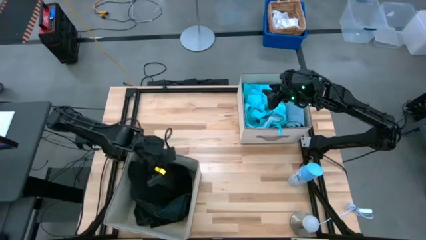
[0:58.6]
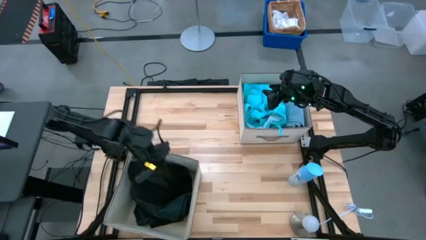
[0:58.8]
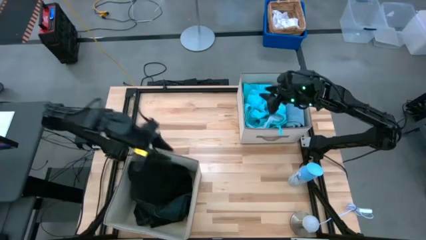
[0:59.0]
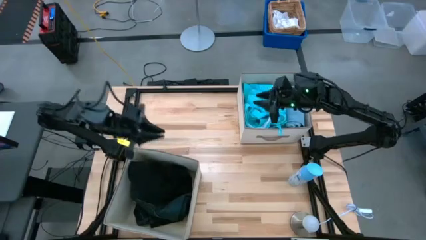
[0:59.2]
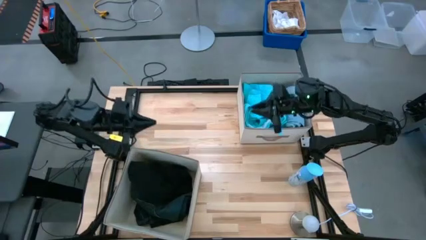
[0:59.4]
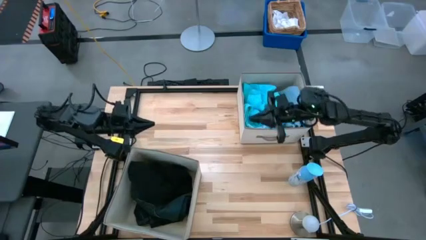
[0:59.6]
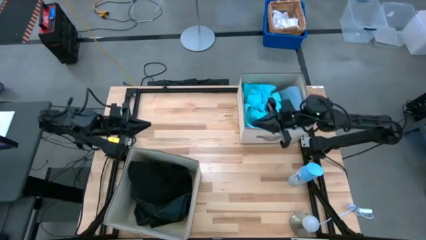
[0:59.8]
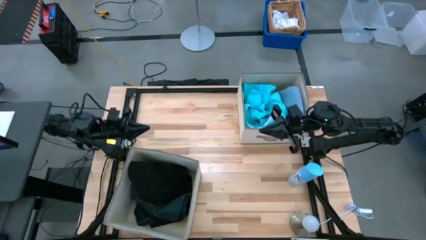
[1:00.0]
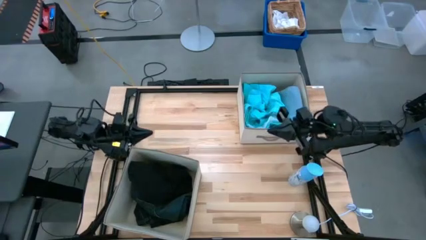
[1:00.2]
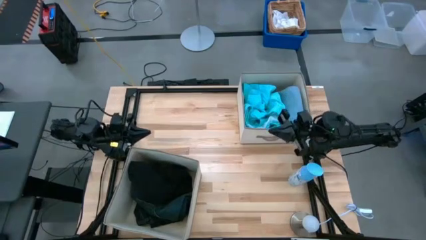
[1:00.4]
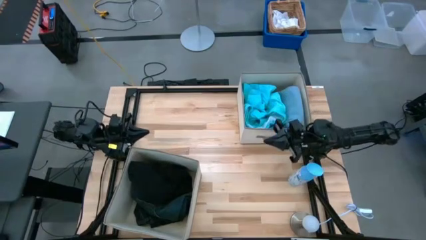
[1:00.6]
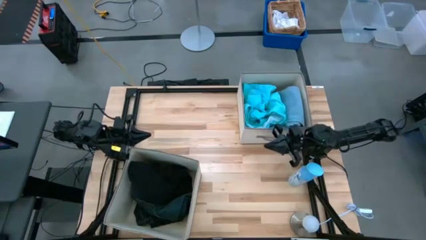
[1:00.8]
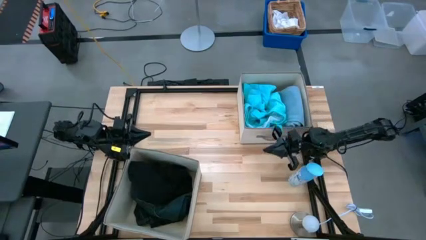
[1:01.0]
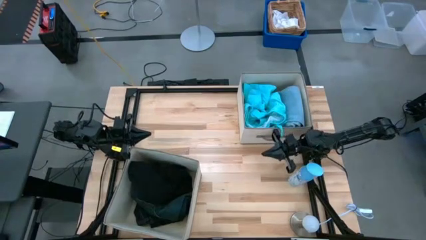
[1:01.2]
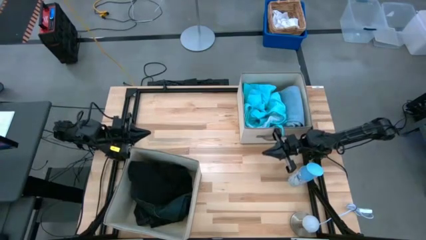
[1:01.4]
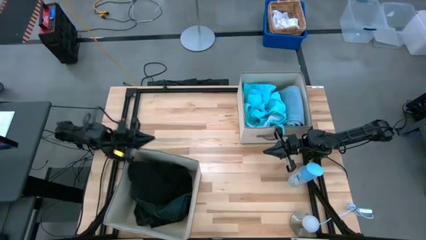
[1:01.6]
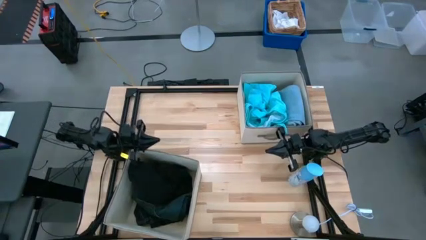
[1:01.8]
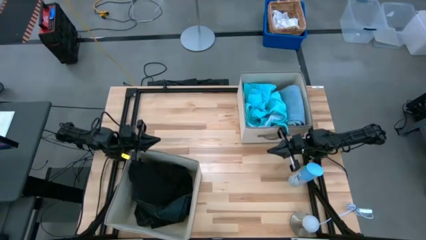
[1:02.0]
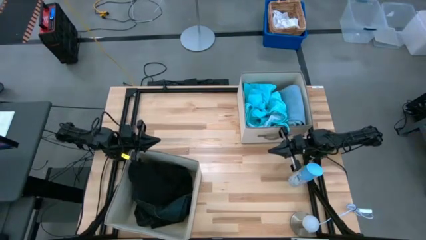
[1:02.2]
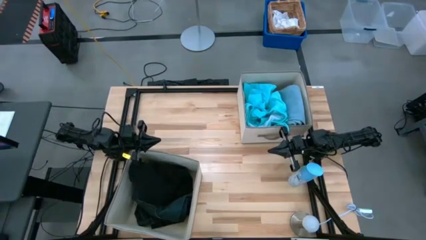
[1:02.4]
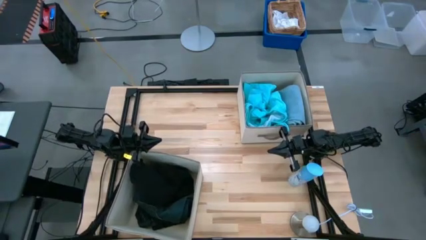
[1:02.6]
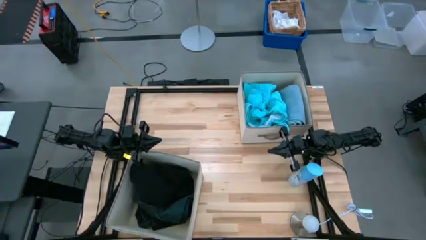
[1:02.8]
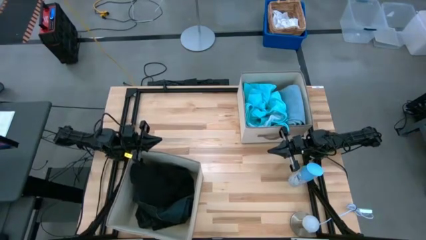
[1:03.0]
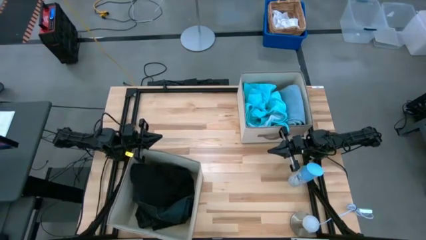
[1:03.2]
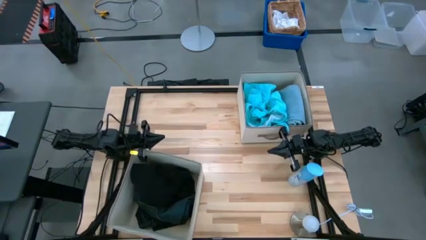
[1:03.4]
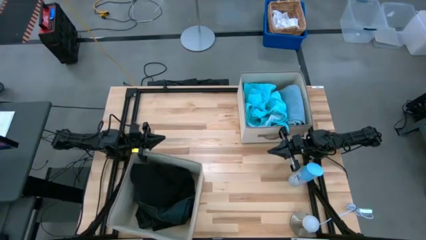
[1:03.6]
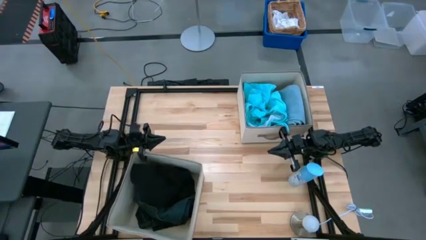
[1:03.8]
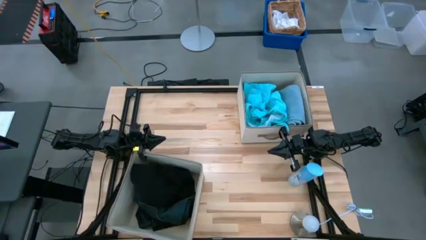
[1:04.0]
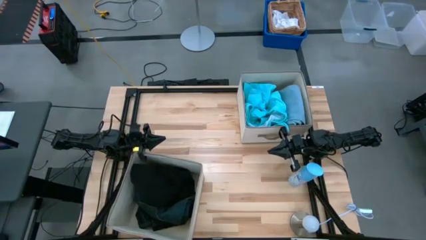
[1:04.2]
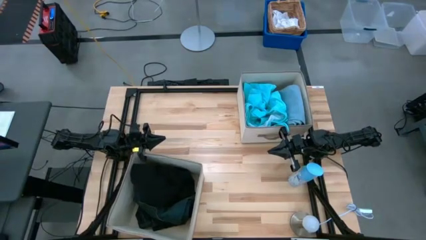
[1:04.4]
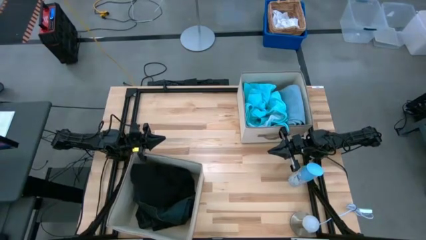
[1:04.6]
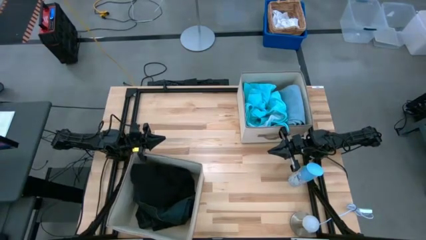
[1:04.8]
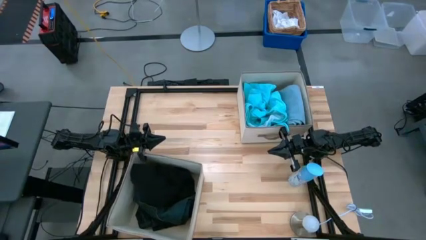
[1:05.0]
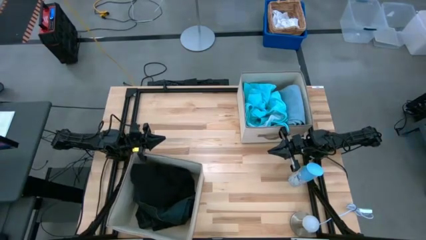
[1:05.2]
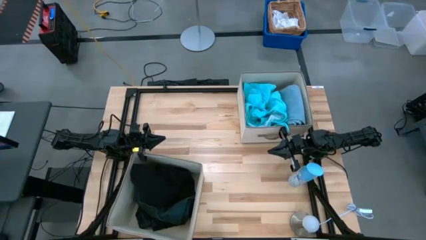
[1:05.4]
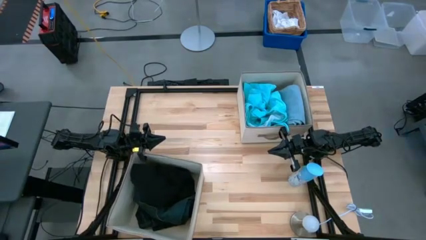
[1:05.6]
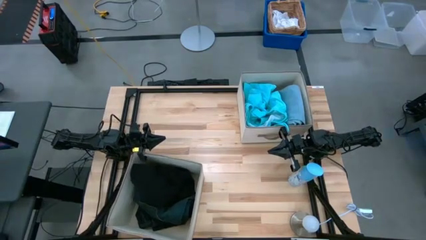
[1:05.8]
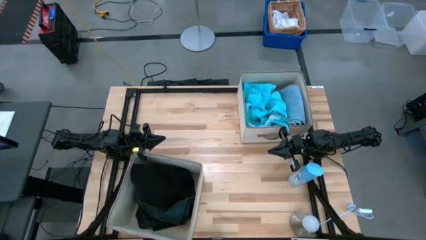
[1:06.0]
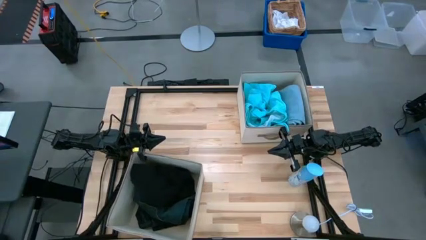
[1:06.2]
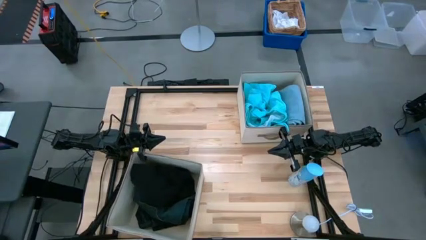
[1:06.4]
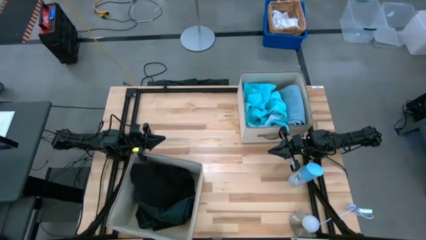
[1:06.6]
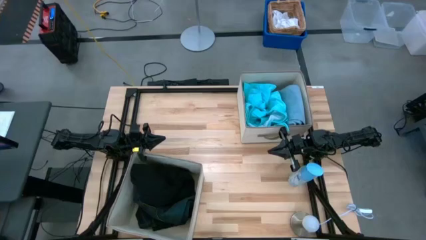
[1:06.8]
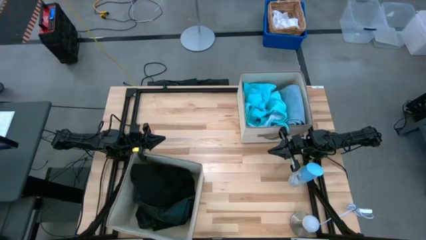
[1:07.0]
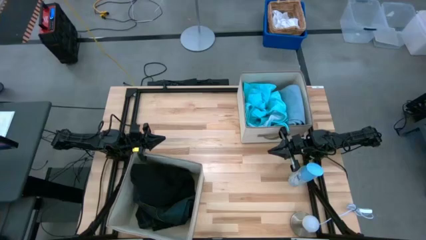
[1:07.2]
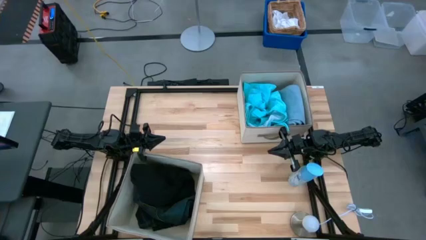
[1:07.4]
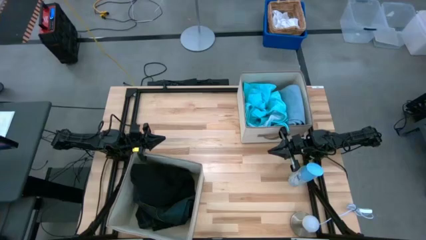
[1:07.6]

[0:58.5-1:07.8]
Task: Sort clothes
Return to Home Position

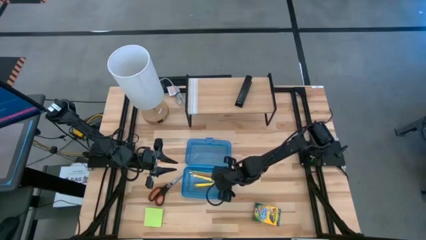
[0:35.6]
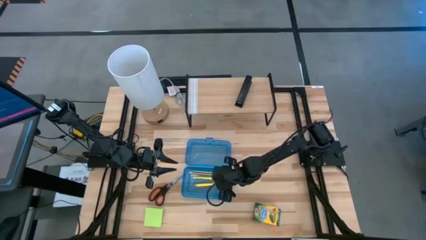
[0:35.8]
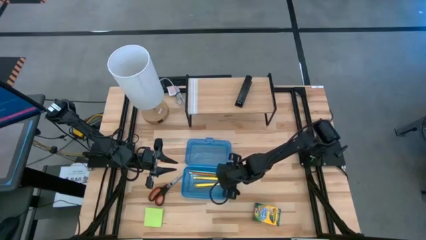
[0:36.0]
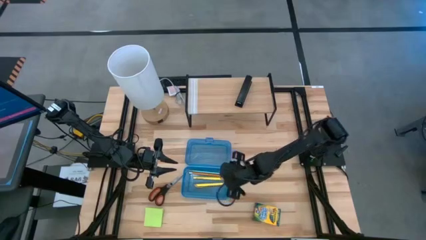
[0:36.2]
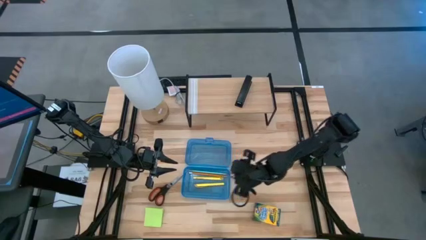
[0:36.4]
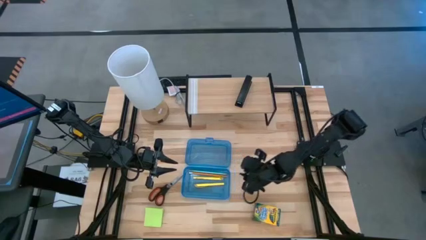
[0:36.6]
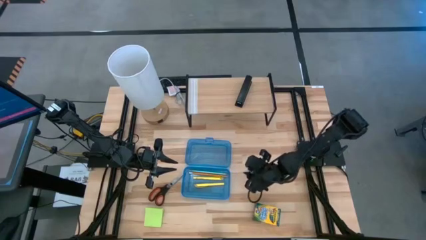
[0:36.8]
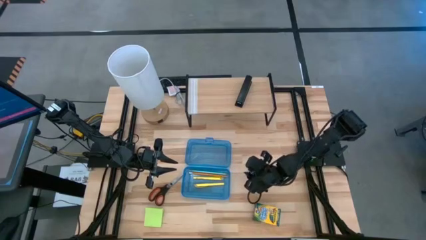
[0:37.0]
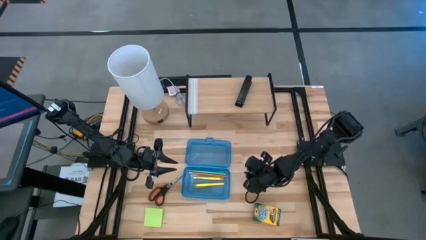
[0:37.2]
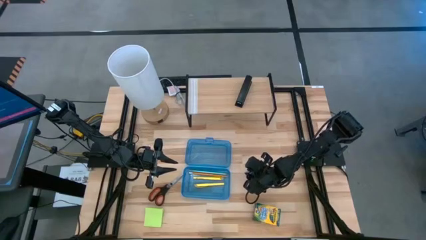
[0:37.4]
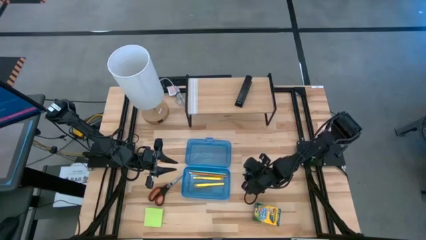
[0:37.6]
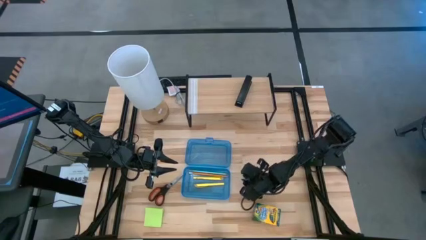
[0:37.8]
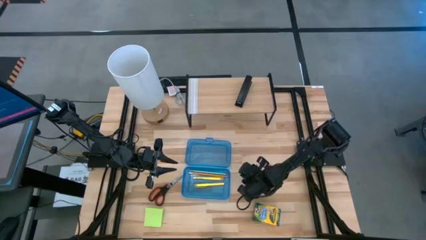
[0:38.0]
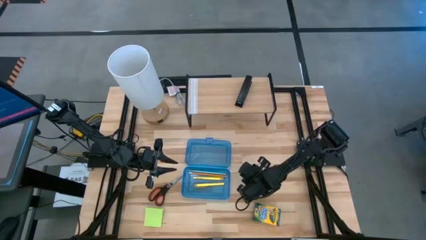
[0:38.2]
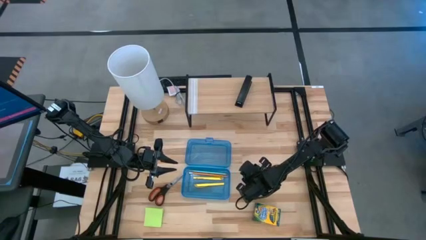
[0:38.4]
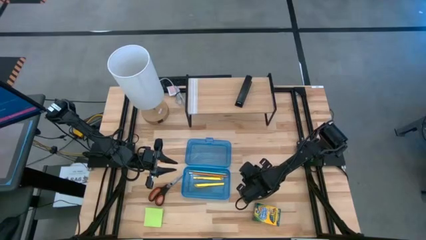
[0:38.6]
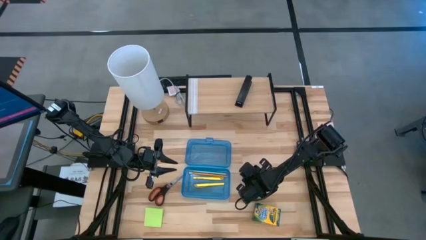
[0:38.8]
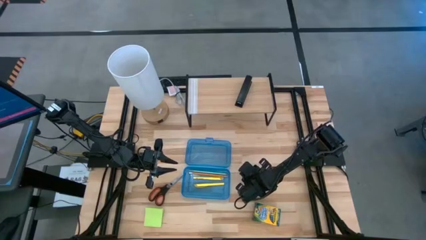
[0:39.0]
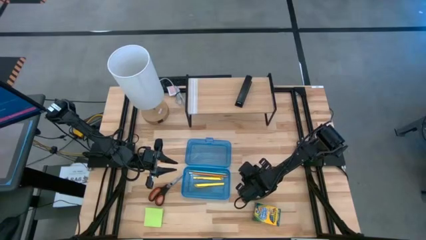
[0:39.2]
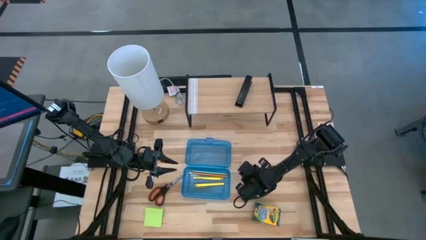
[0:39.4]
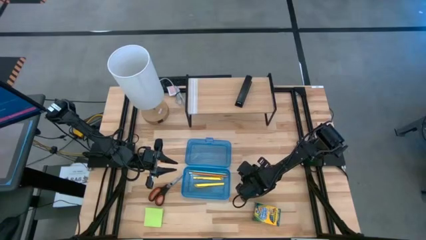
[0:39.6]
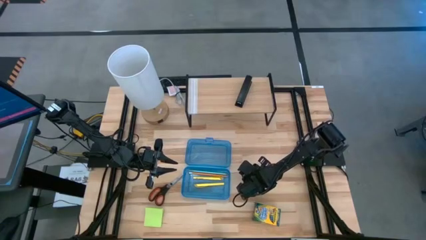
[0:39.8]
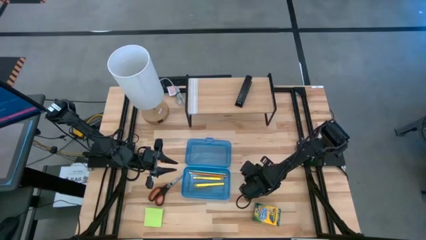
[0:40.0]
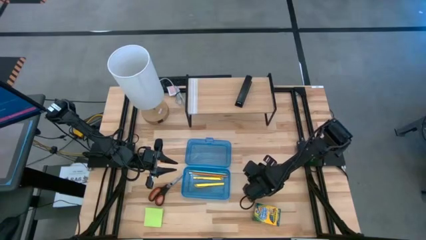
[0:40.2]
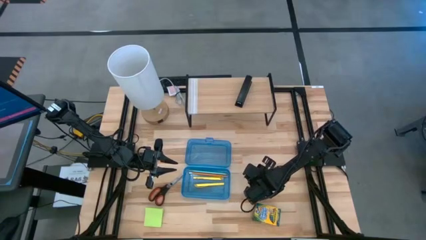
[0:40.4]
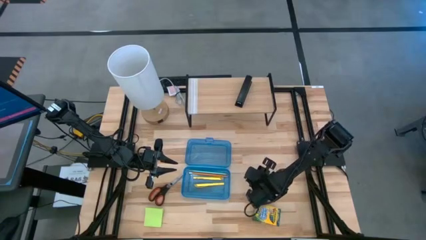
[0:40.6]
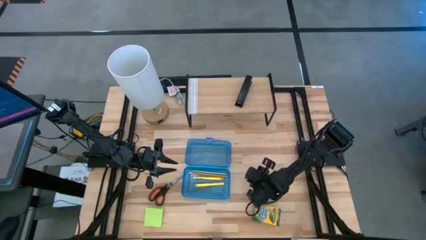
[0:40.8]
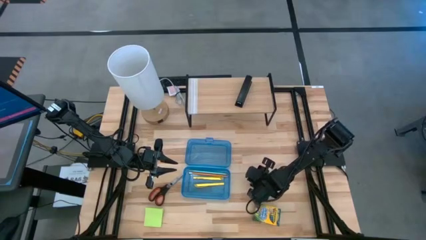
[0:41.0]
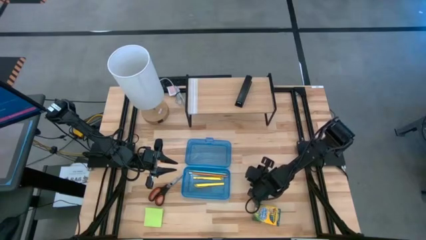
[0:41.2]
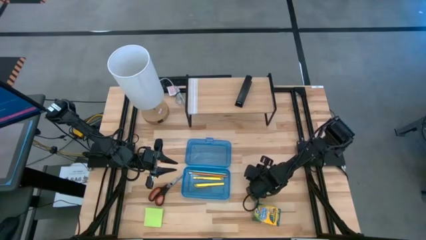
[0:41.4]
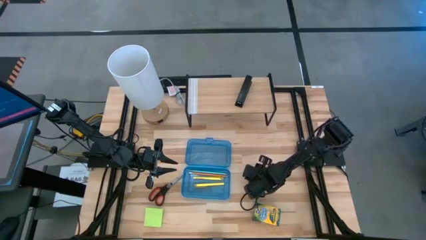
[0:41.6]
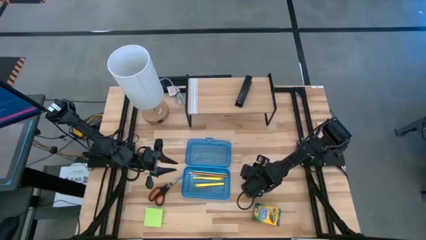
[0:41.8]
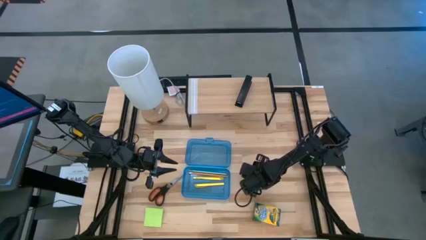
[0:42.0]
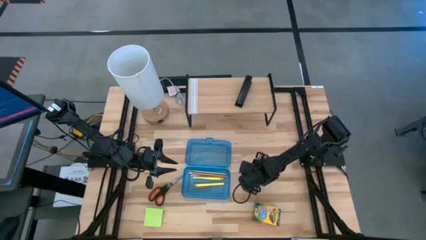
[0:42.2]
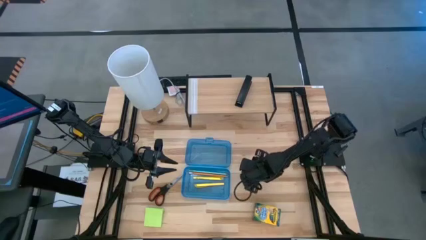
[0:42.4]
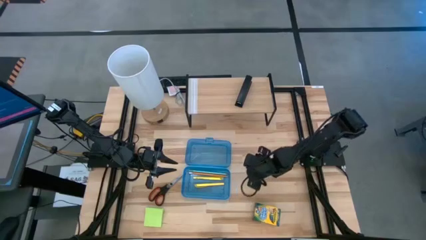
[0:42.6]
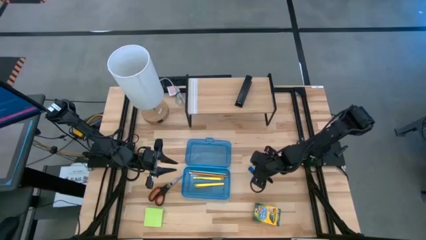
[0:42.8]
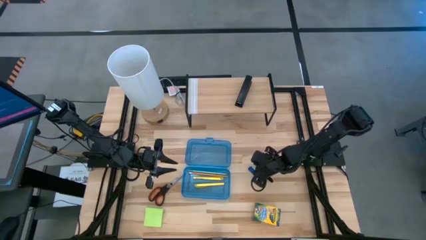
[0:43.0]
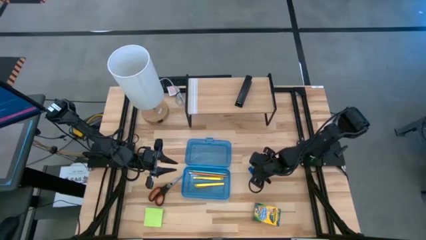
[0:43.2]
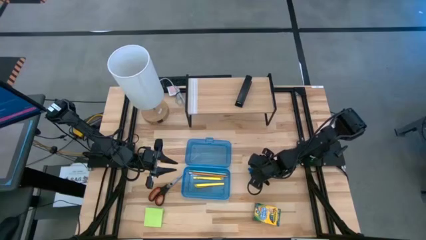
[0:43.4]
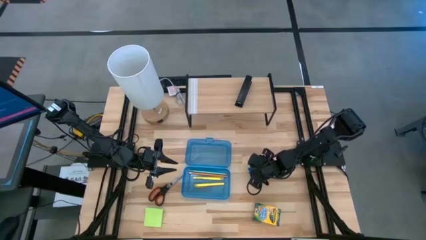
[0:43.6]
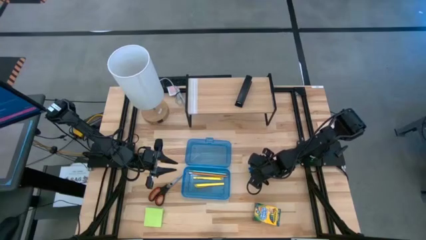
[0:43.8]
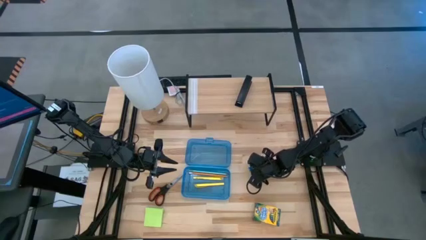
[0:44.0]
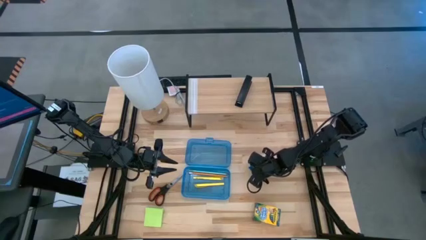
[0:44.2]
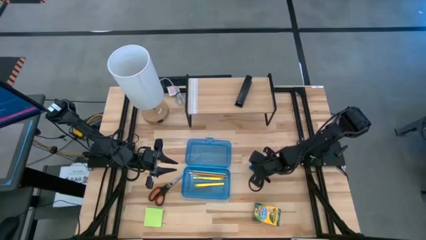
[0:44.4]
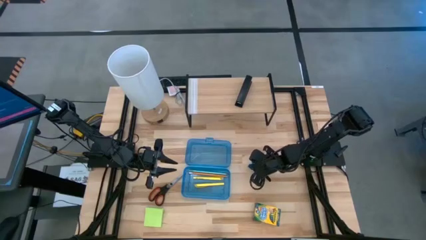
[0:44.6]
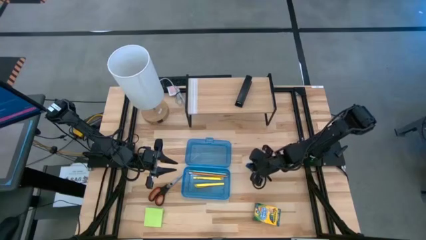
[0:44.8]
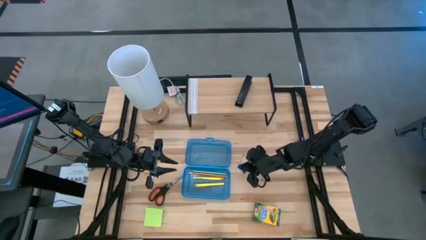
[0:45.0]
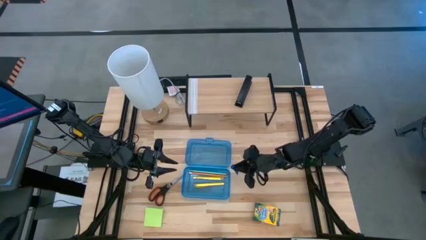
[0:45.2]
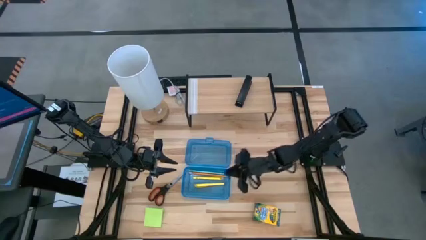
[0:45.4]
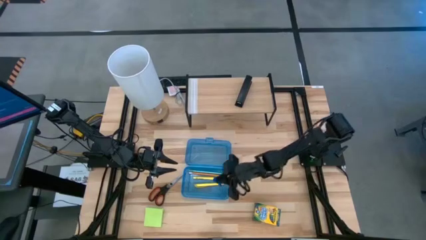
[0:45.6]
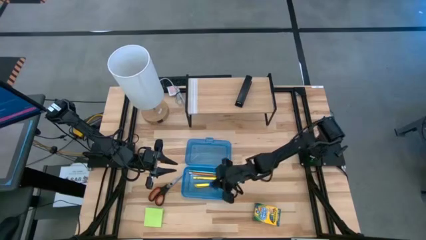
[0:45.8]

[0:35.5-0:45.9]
Task: Pack school essentials
Put the blue eraser into the supply box
